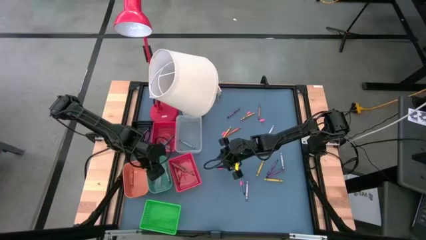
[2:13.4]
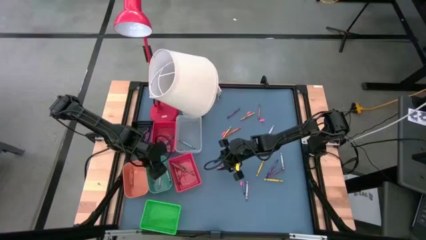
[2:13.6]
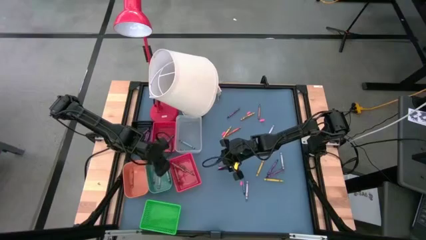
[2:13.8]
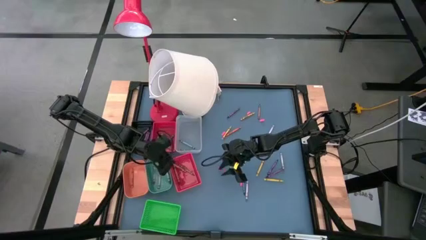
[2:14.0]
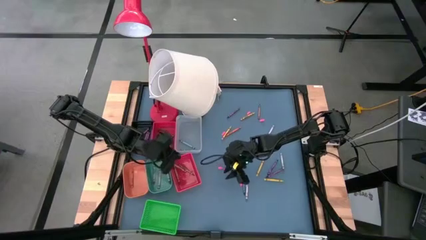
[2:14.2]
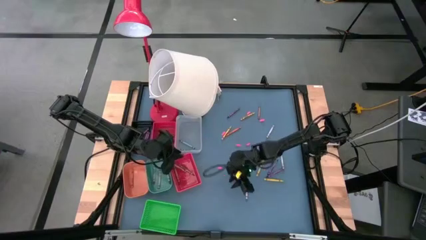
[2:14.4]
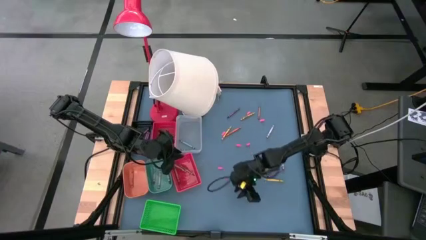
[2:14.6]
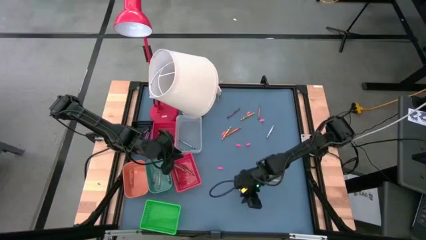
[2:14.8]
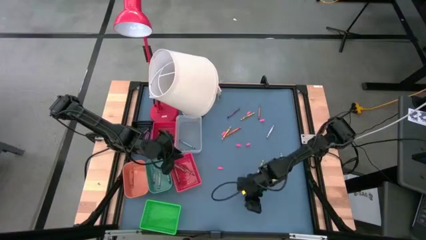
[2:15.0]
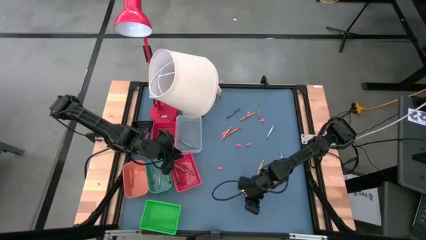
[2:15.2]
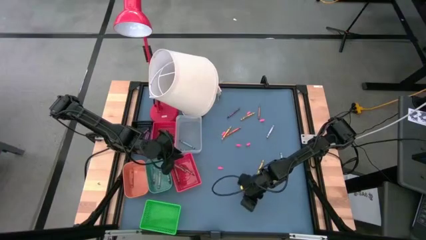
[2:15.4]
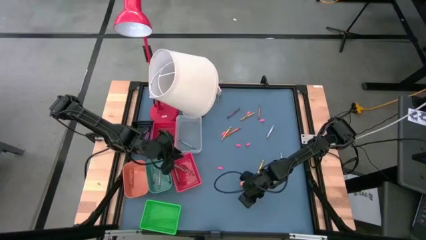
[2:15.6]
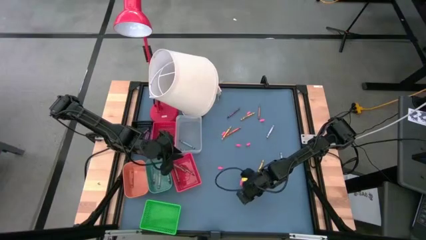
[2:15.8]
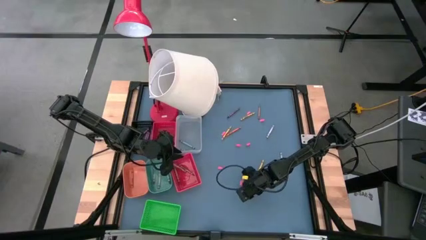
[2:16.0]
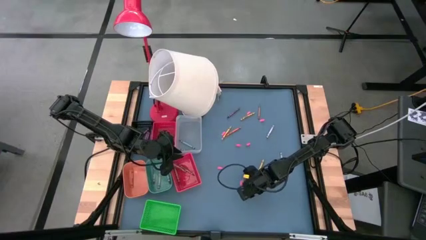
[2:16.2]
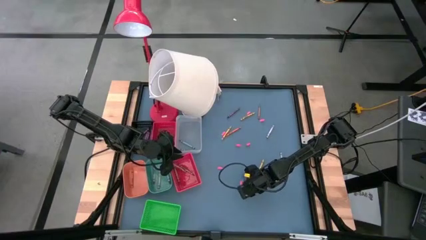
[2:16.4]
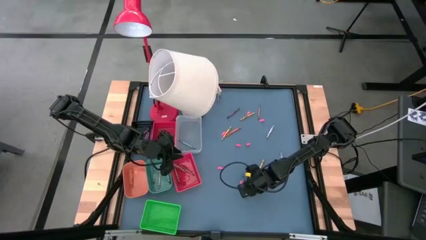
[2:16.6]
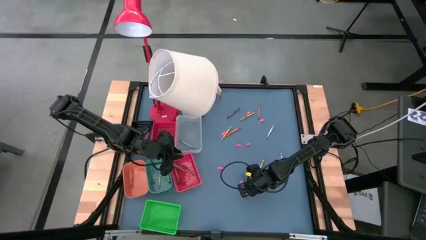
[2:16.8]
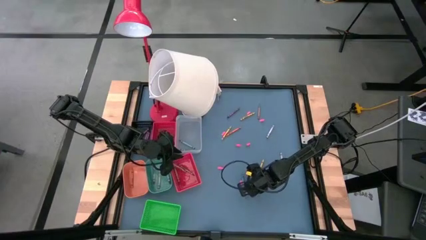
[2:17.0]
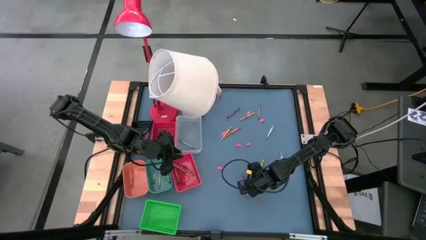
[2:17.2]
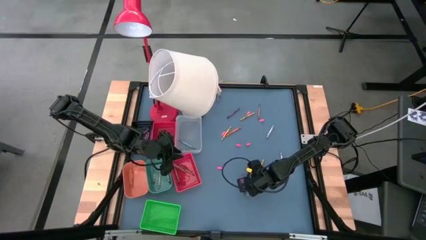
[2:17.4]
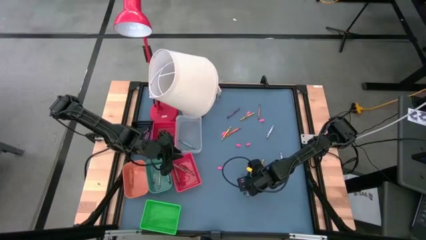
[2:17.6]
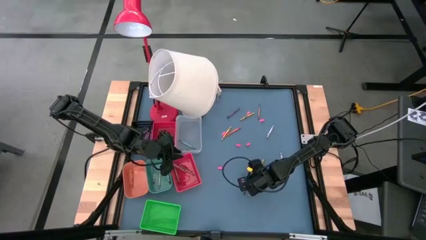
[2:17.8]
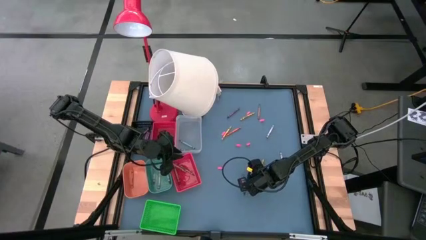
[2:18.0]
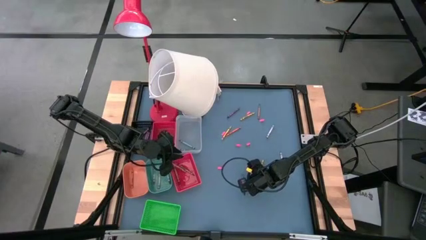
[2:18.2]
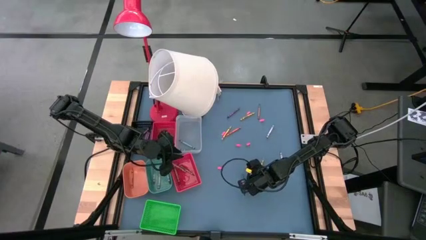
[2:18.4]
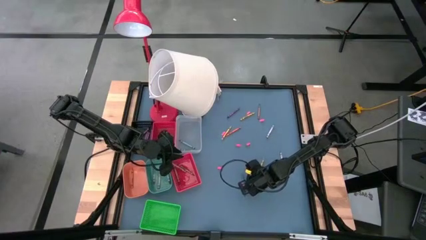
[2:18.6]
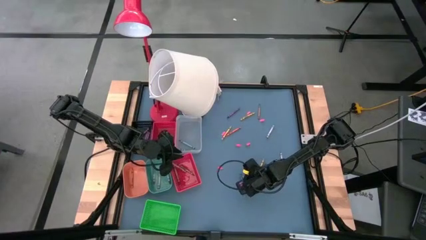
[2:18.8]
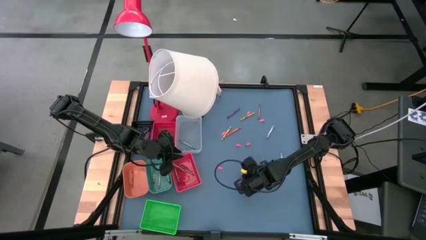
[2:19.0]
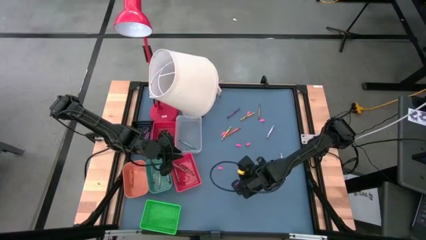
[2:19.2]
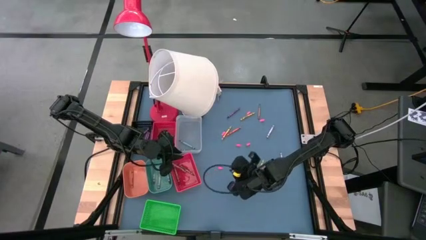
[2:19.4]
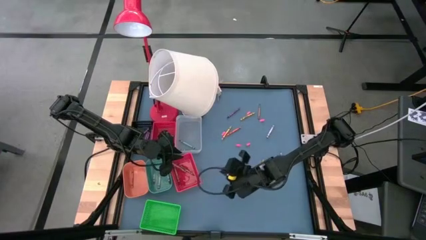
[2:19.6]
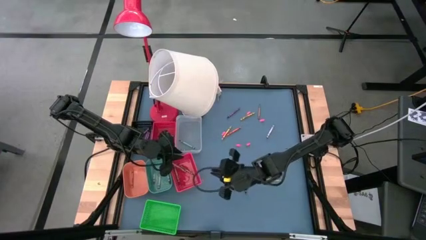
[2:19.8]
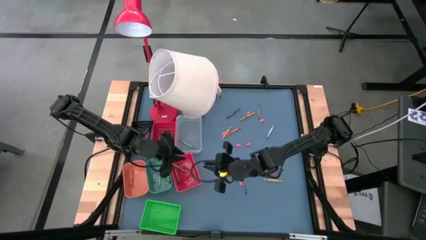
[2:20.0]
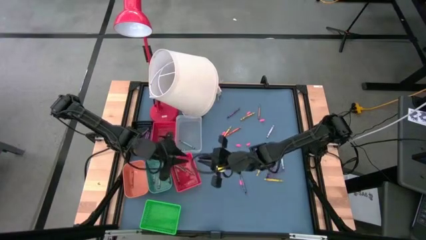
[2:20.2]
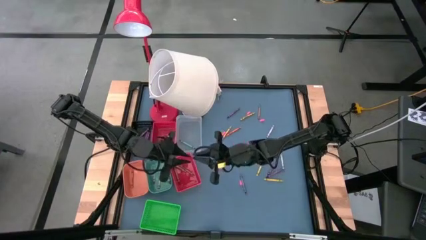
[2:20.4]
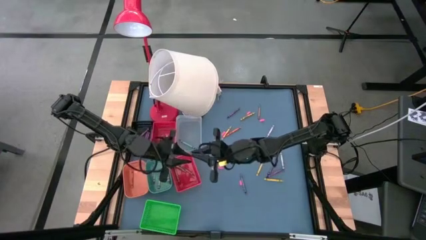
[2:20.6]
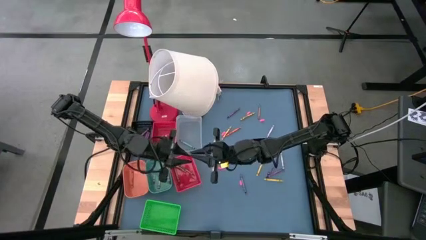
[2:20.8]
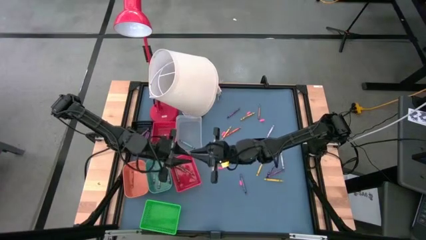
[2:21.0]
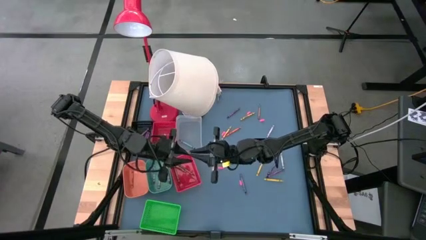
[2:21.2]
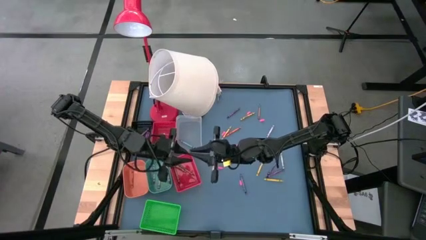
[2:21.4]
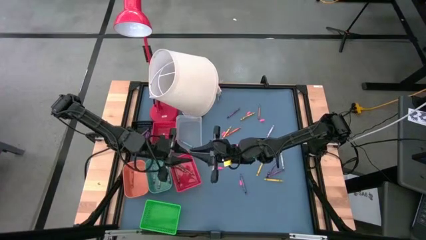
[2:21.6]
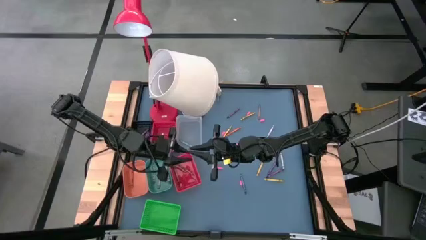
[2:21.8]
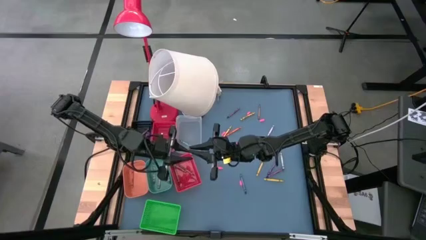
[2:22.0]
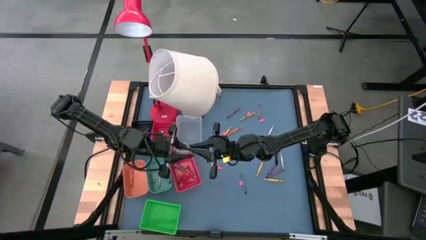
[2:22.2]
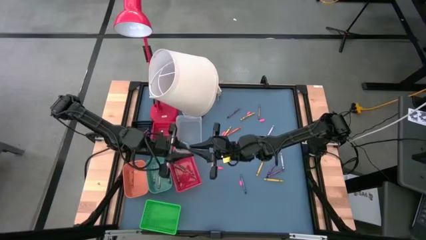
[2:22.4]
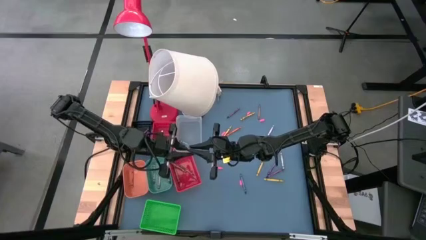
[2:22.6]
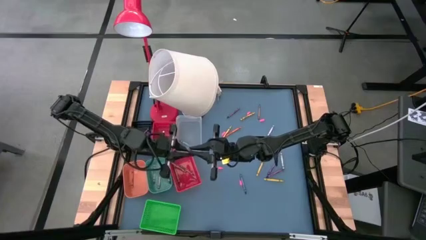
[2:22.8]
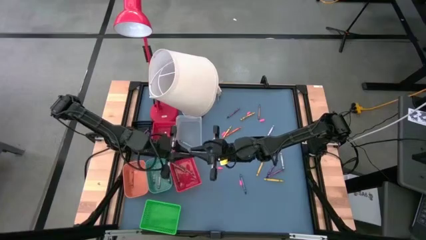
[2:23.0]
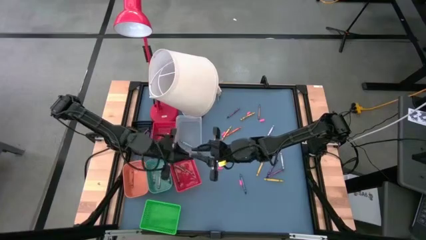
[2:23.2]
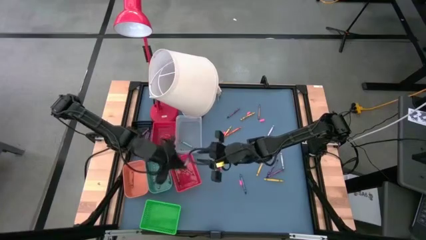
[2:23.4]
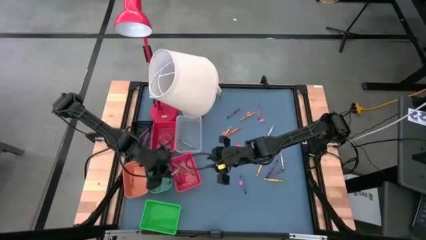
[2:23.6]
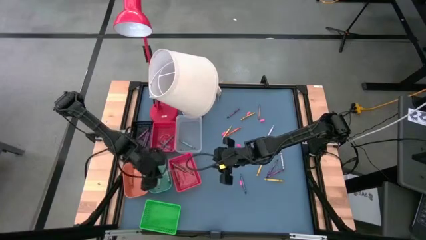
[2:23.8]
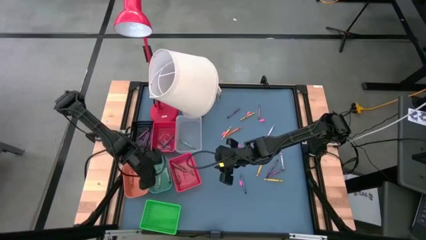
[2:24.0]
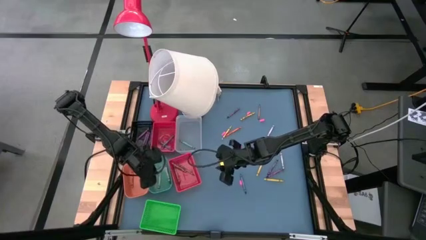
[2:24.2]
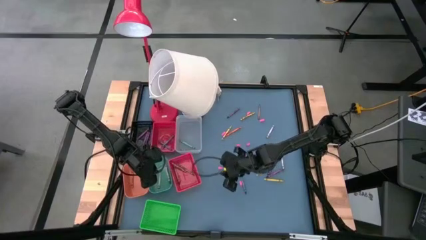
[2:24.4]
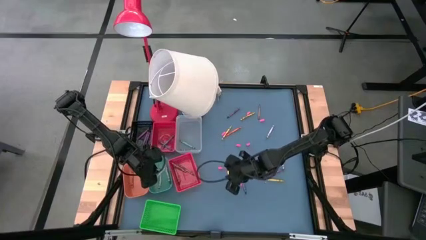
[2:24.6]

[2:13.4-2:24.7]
Task: Sort crayons
Put the gray crayon into the green bin
